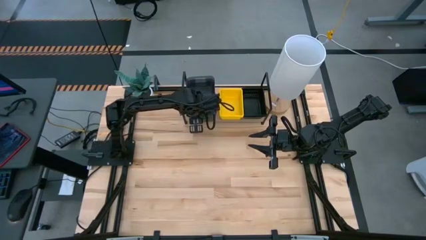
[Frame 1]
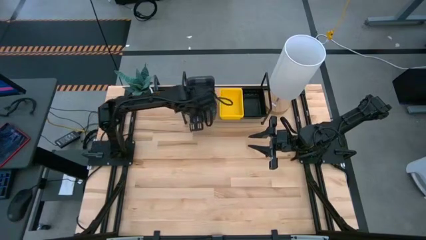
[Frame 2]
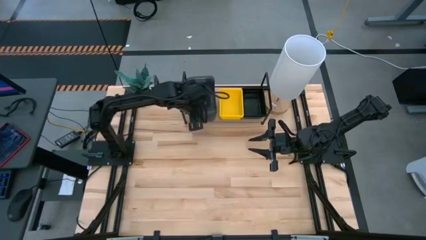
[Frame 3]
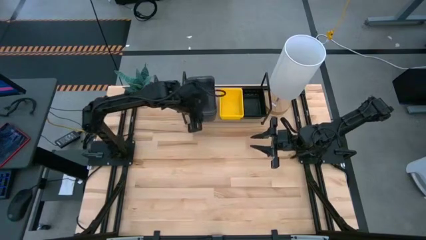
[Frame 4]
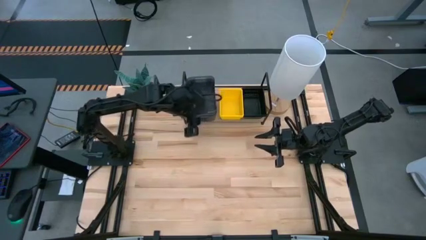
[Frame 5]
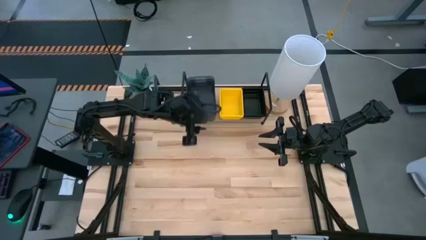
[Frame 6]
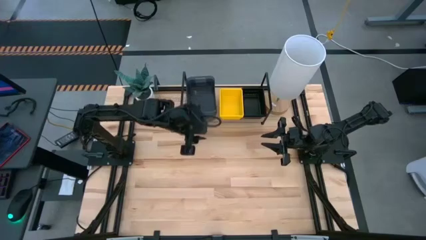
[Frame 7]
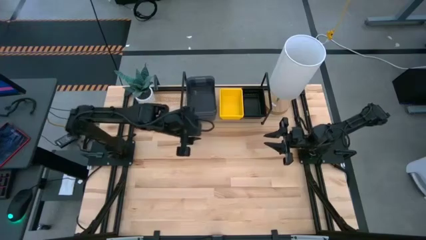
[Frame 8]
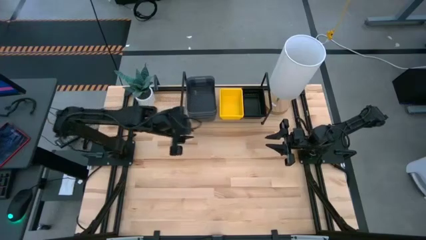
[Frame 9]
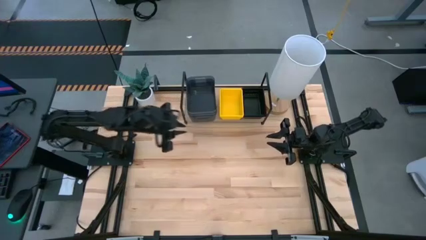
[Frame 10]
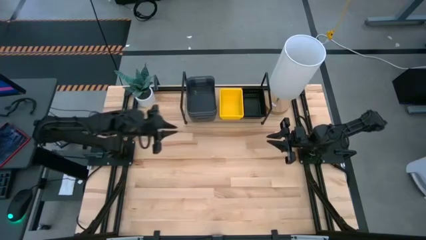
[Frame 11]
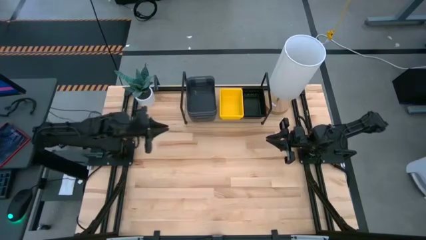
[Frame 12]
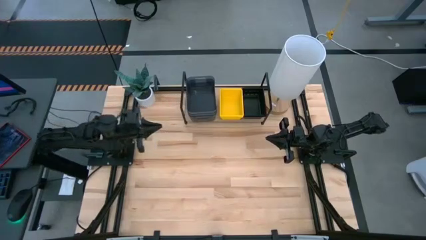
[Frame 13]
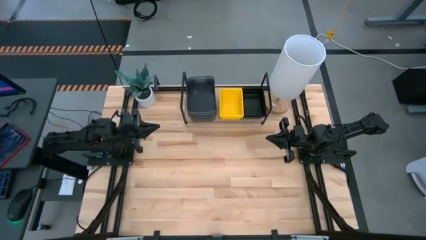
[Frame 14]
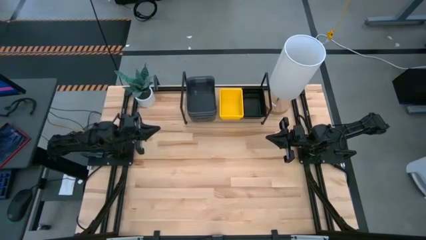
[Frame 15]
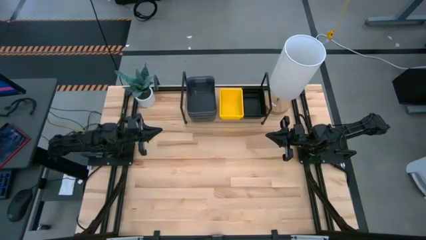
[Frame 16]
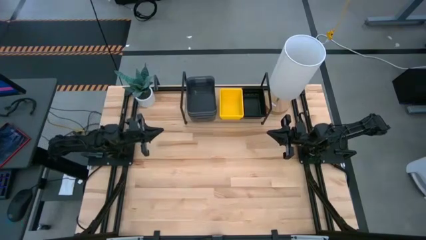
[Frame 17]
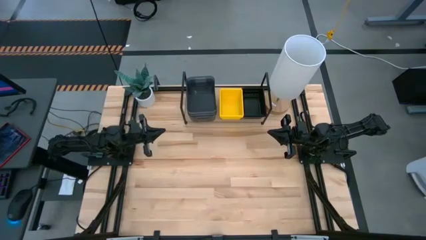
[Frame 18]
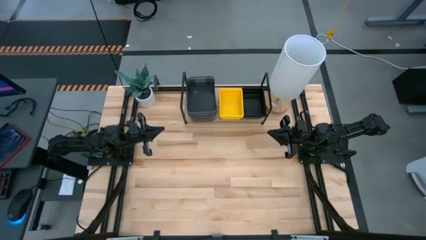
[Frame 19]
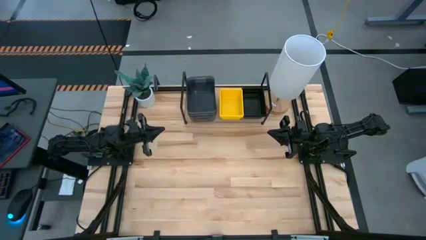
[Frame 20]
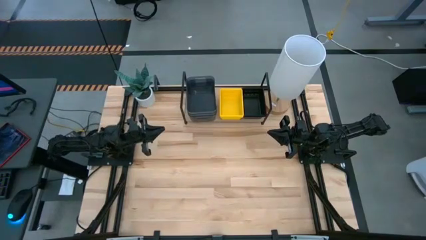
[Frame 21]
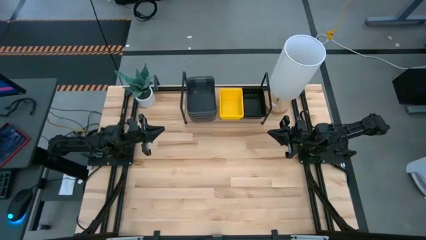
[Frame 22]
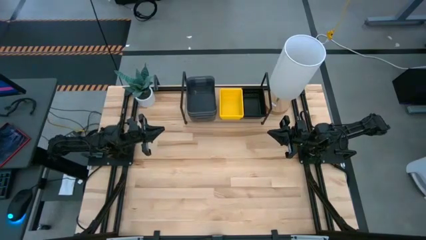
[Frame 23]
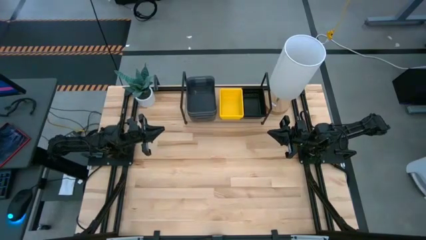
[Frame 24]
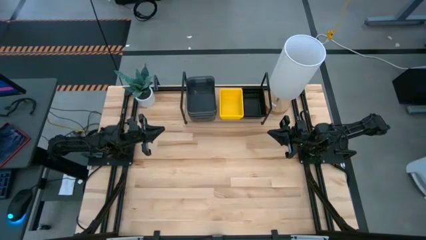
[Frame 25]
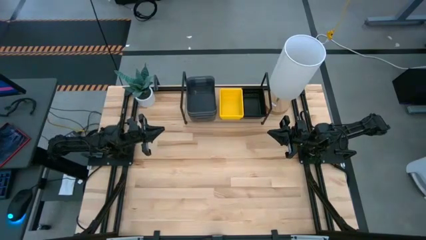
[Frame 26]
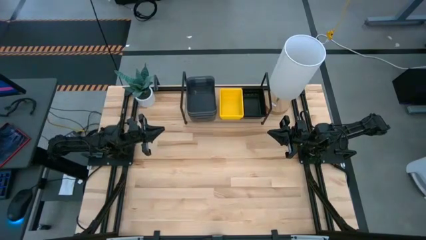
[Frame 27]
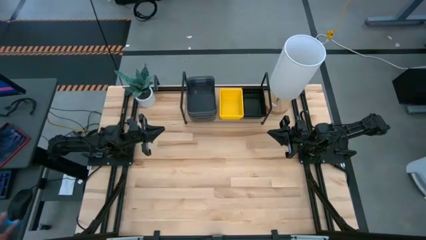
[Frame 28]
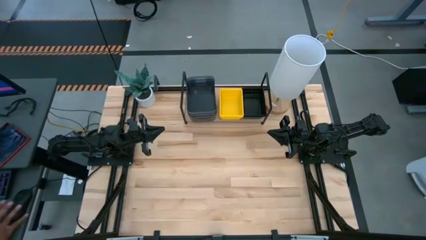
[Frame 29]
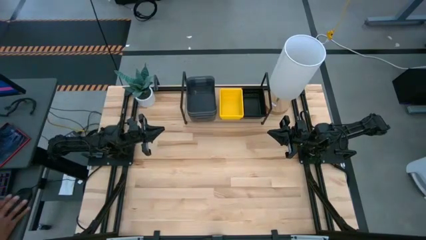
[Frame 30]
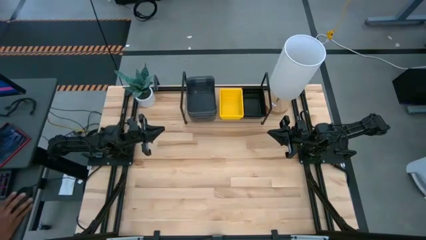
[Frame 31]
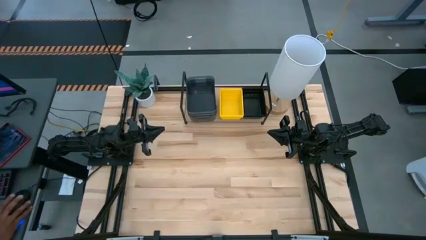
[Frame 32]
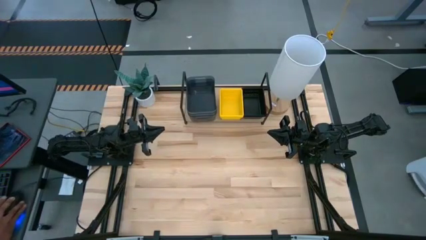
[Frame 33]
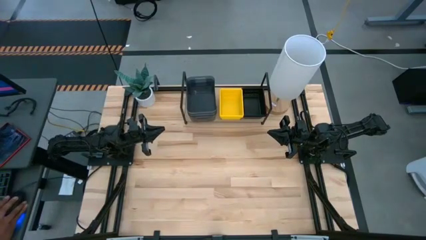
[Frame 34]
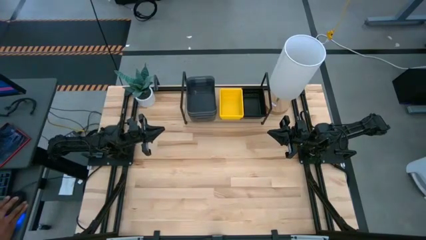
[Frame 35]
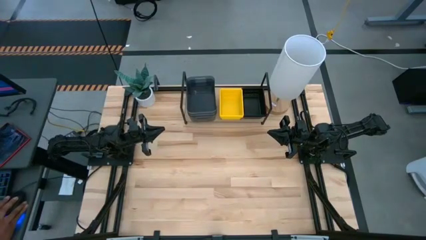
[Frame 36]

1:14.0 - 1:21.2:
Task: Stack baskets on shelf by color
Return to Home Position

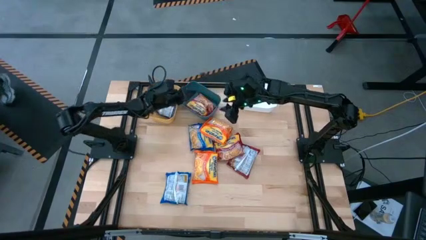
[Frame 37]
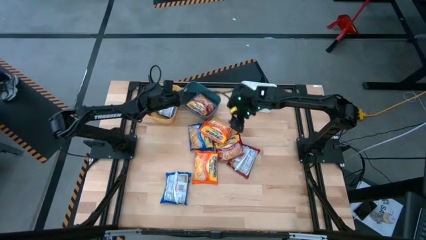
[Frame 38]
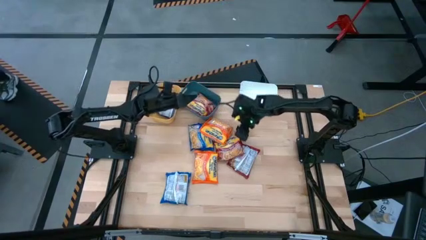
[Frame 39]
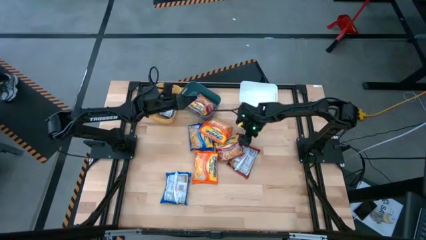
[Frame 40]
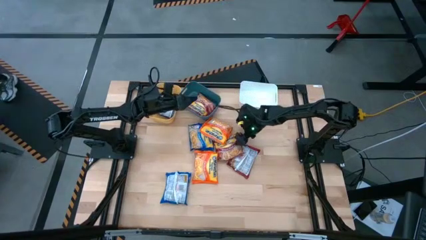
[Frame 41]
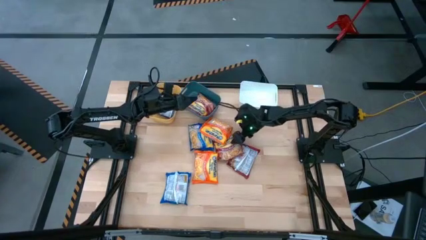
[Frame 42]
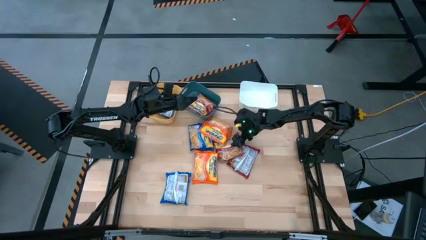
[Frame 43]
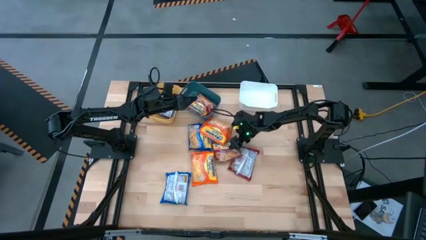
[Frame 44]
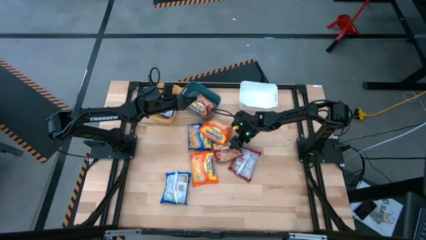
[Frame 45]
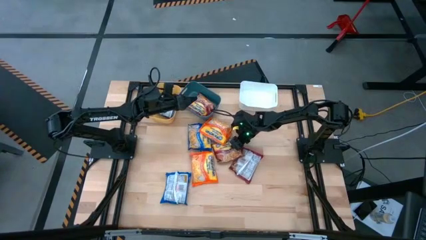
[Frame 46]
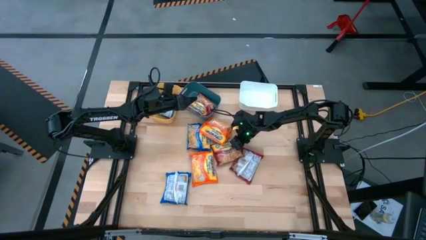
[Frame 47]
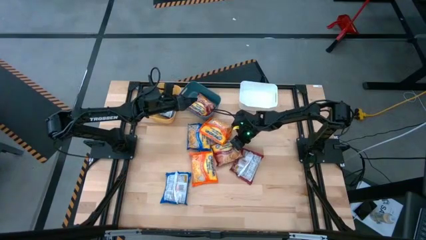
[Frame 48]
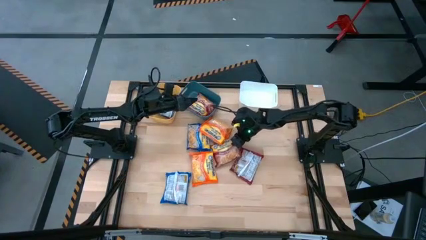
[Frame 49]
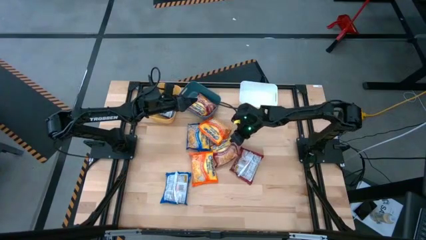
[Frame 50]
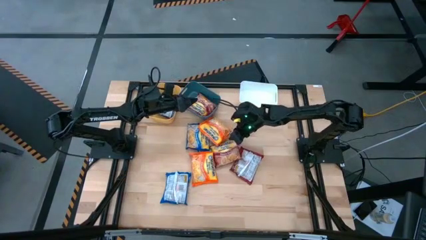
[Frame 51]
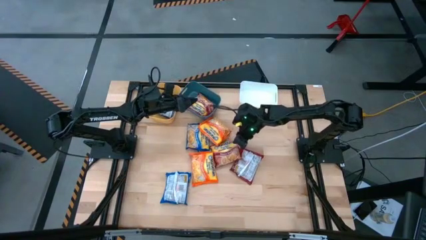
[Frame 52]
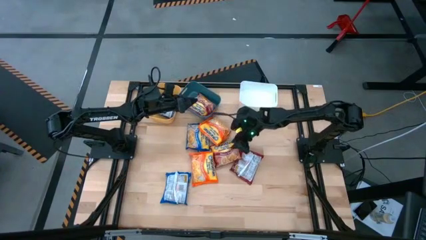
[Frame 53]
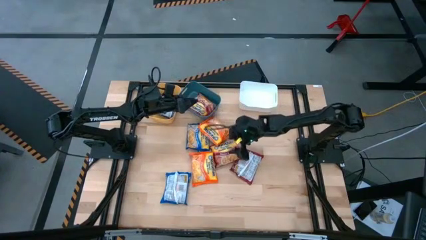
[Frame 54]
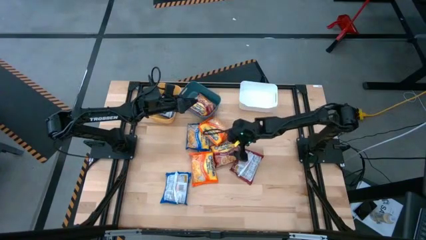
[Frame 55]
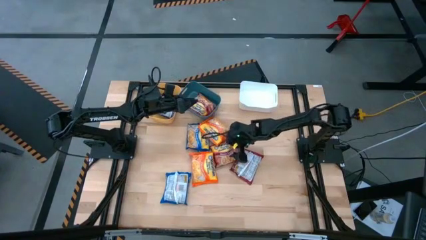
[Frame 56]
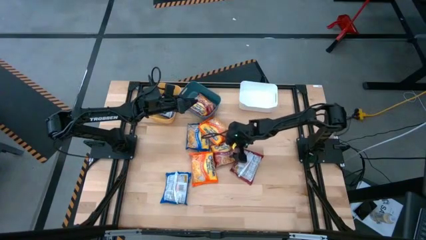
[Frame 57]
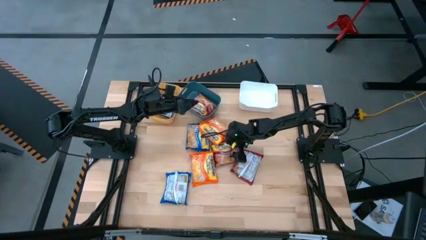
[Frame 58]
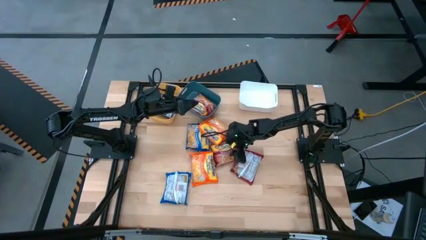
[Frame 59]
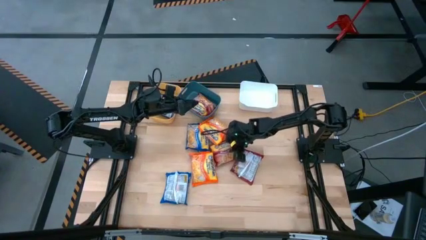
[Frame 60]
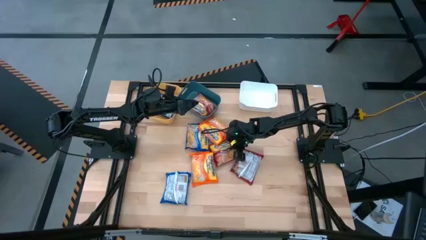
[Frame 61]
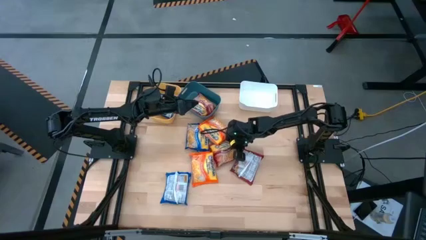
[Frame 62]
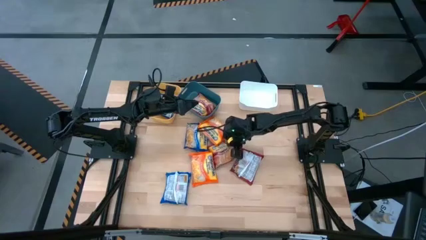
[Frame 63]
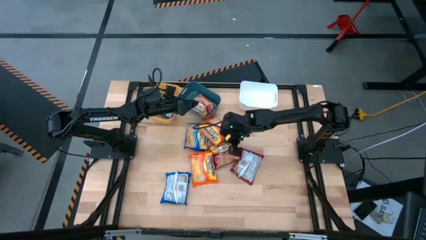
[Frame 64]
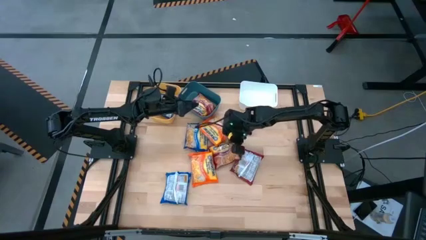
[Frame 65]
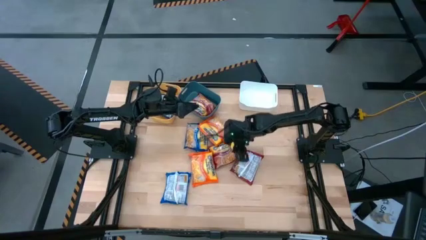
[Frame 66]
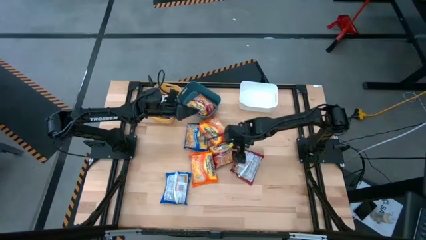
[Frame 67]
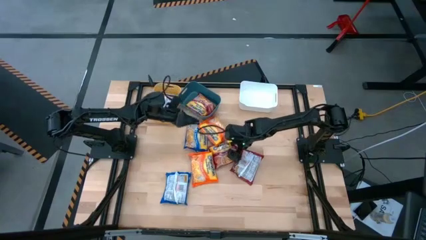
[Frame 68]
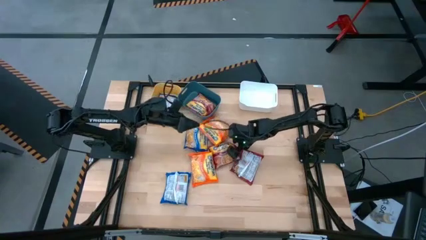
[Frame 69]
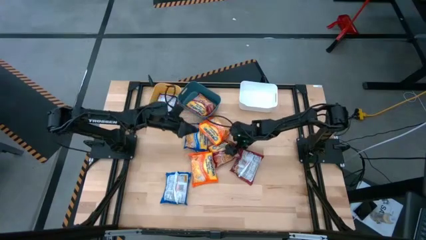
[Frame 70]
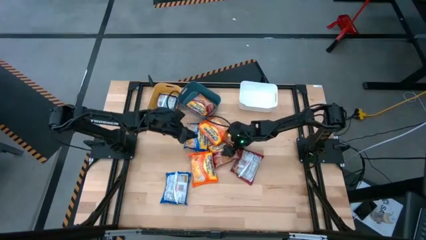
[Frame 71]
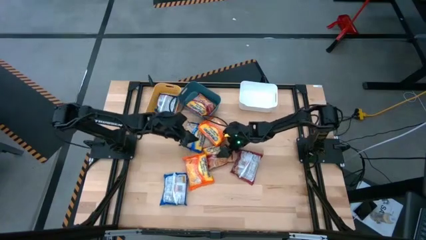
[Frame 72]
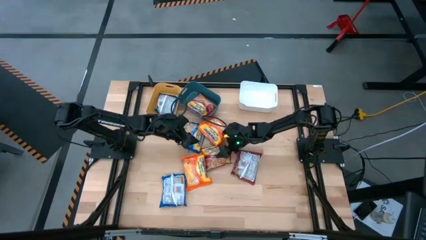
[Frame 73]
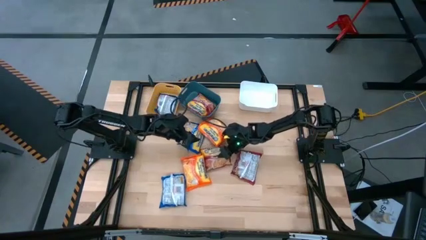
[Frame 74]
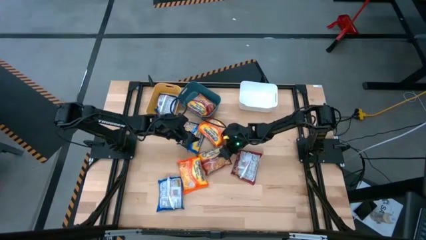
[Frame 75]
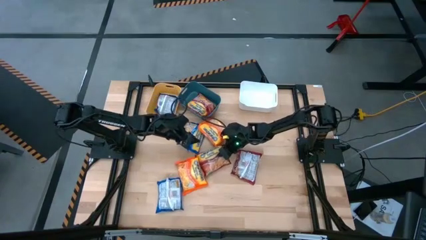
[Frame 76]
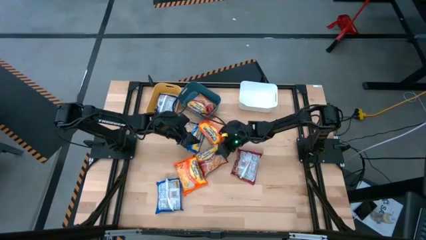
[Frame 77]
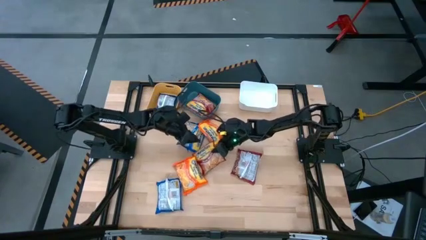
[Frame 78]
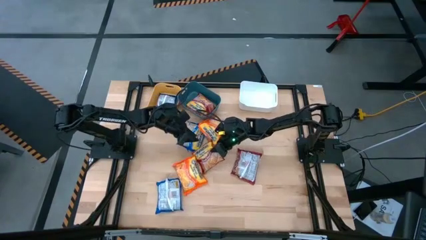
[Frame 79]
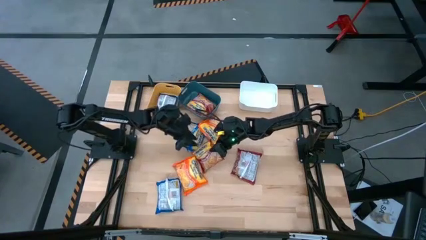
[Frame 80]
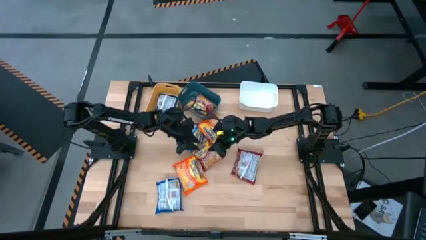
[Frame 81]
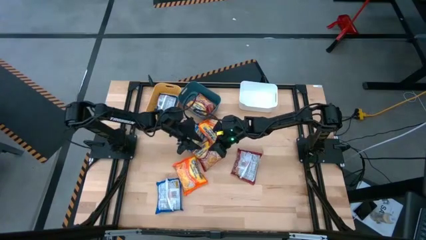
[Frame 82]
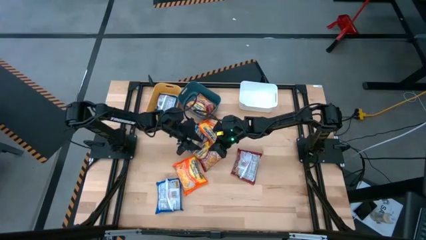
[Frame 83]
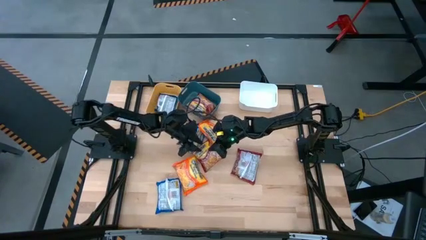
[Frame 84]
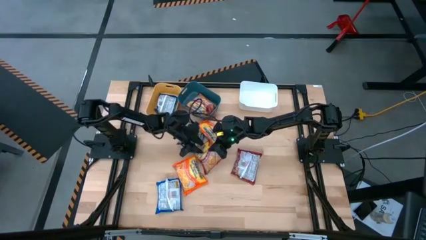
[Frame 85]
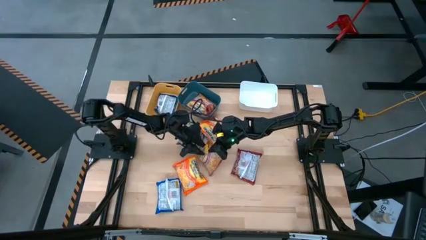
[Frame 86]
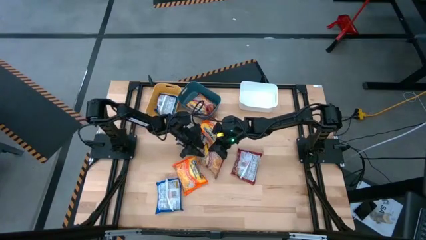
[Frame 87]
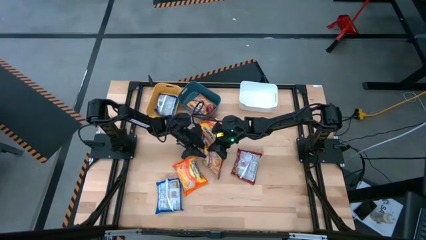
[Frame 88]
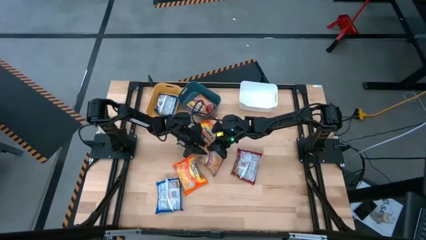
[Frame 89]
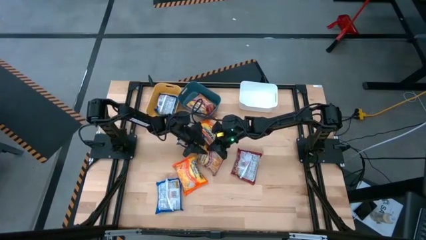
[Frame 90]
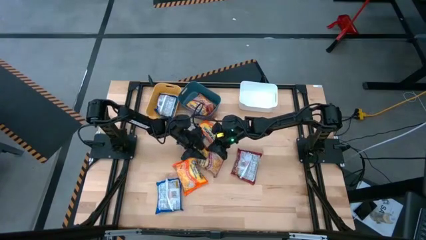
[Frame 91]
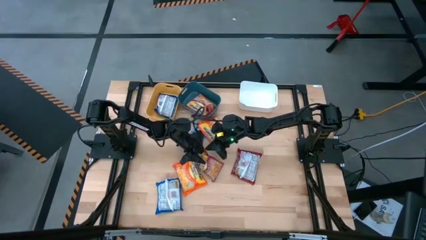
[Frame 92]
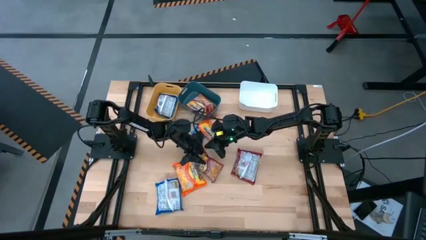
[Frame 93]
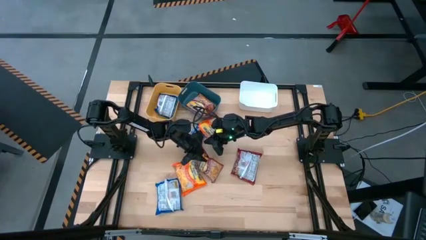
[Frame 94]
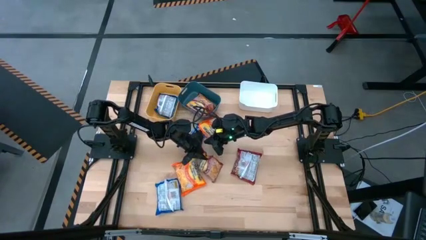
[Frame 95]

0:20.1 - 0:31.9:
Task: Sort Maruchan noodles
Put the left red bag into the blue bin
